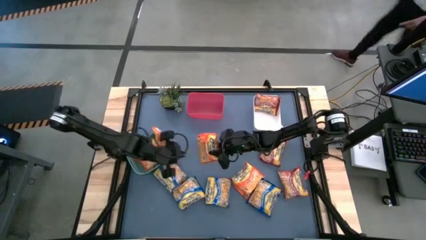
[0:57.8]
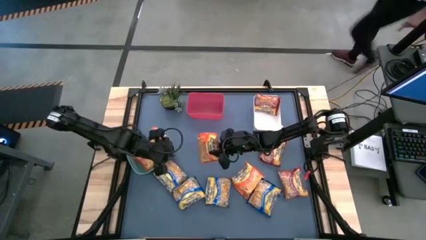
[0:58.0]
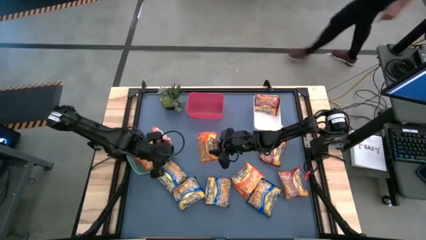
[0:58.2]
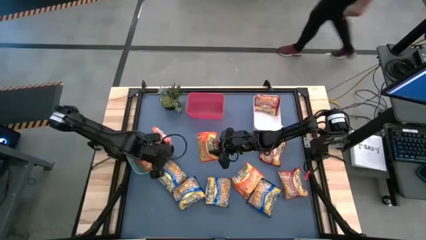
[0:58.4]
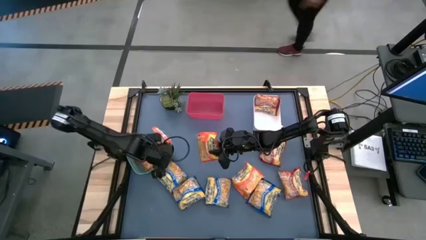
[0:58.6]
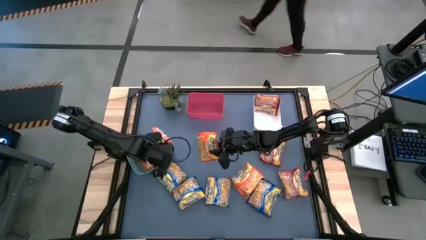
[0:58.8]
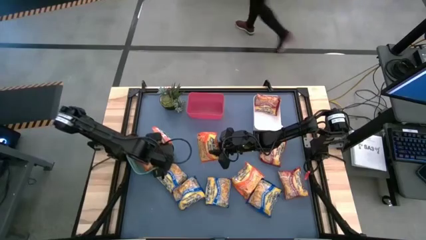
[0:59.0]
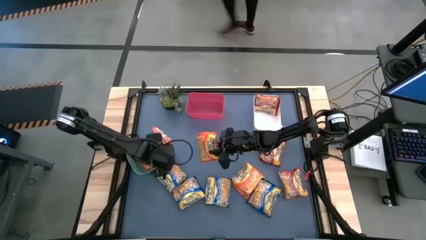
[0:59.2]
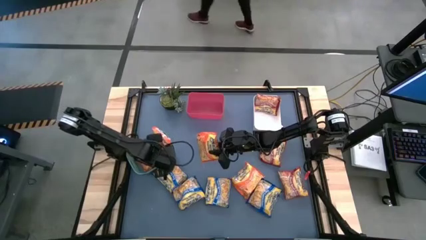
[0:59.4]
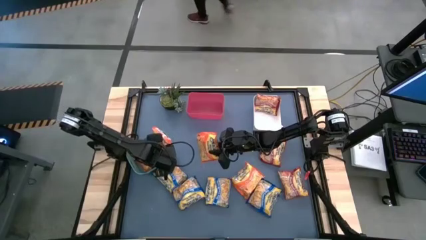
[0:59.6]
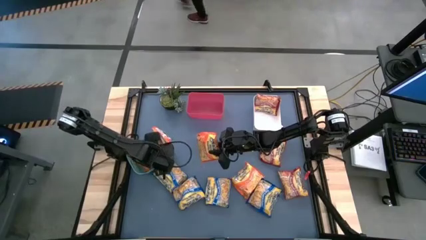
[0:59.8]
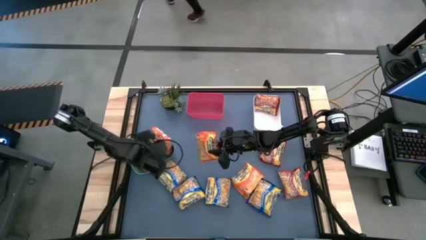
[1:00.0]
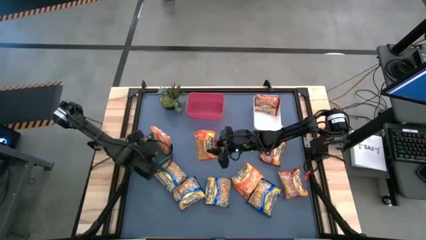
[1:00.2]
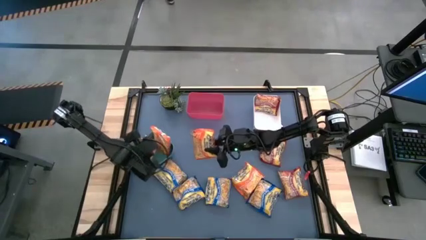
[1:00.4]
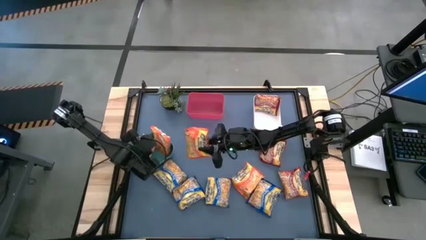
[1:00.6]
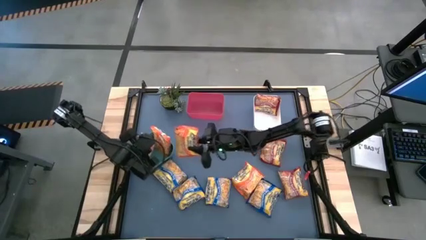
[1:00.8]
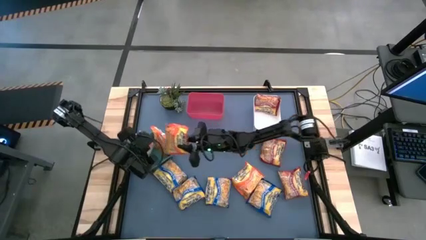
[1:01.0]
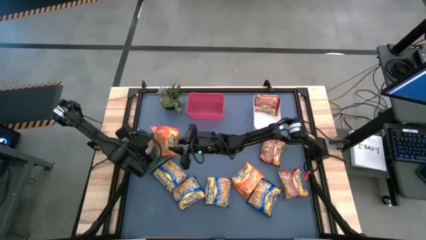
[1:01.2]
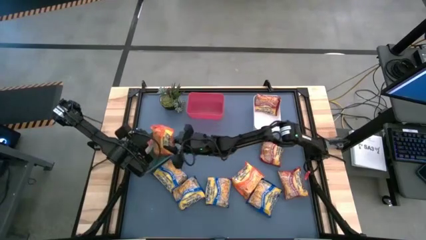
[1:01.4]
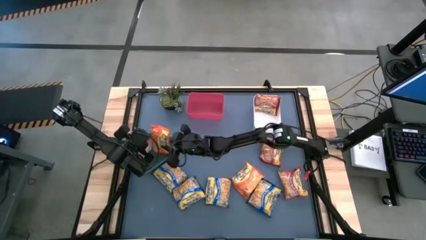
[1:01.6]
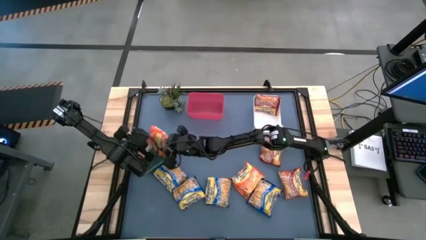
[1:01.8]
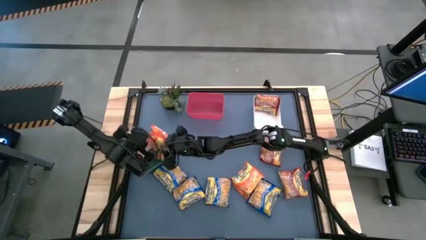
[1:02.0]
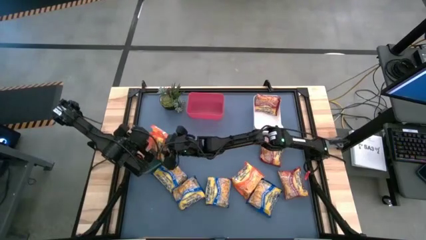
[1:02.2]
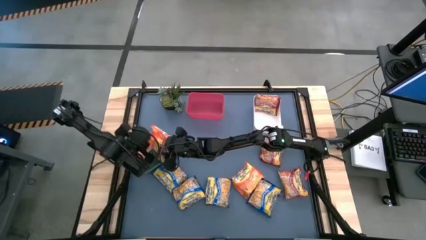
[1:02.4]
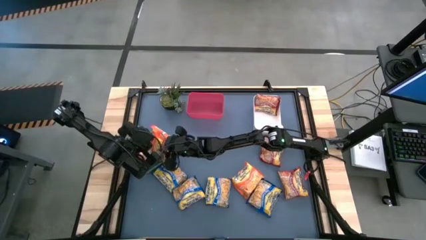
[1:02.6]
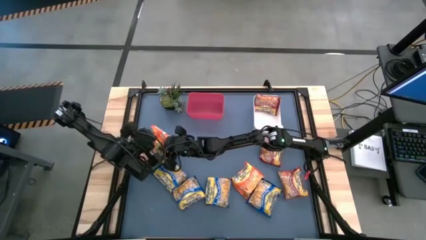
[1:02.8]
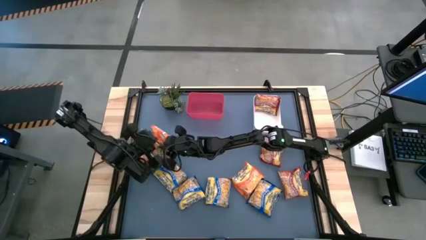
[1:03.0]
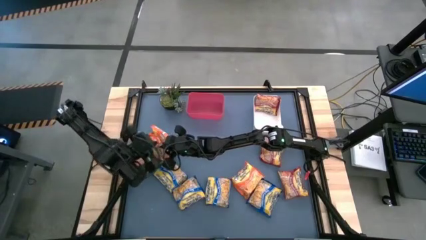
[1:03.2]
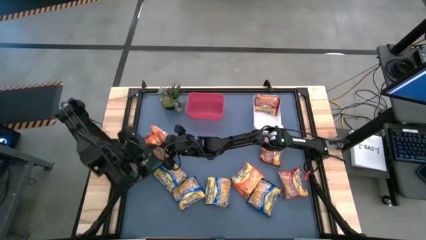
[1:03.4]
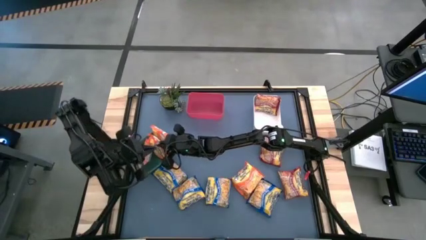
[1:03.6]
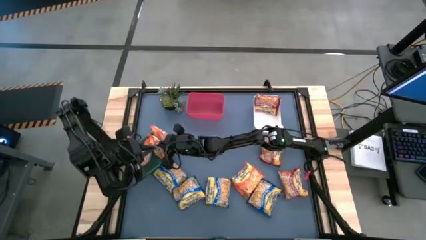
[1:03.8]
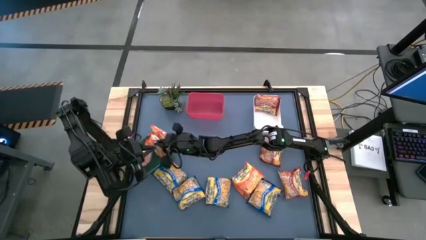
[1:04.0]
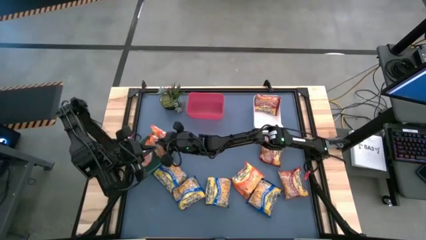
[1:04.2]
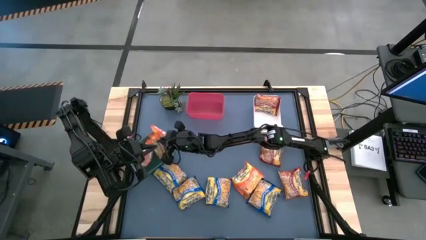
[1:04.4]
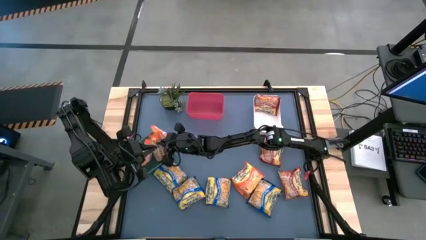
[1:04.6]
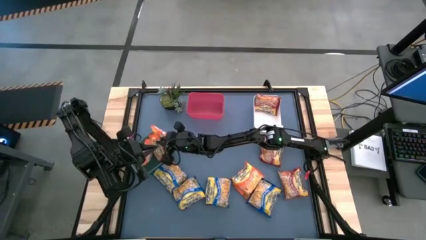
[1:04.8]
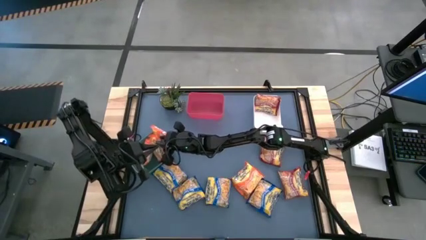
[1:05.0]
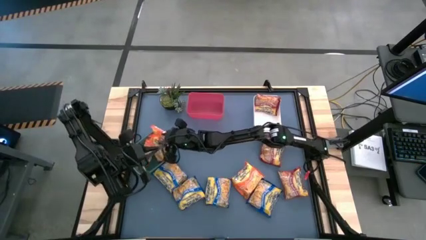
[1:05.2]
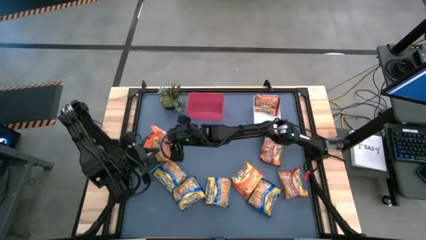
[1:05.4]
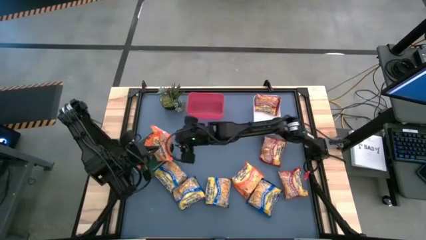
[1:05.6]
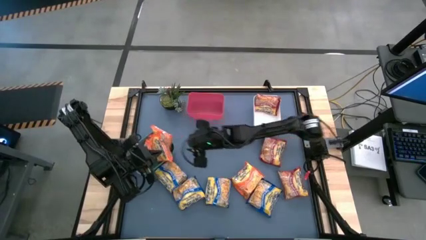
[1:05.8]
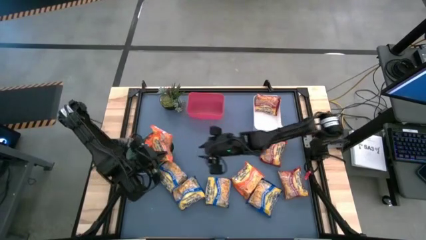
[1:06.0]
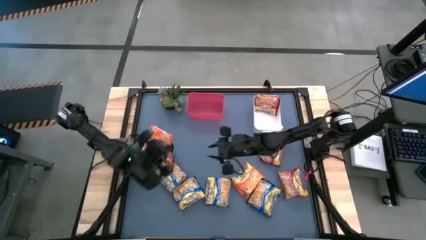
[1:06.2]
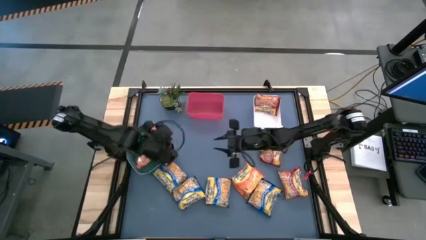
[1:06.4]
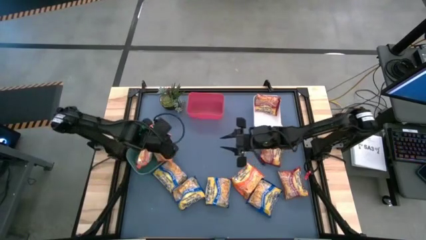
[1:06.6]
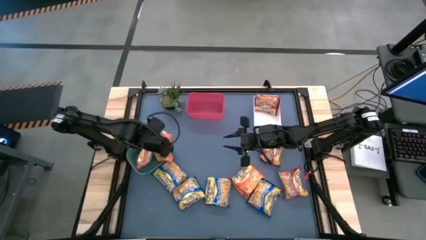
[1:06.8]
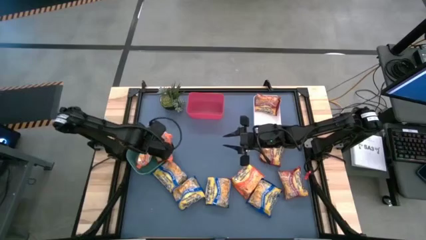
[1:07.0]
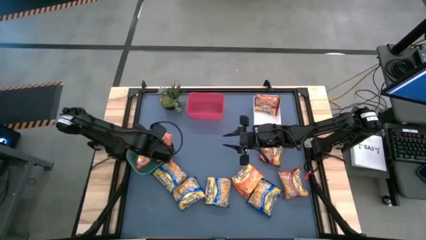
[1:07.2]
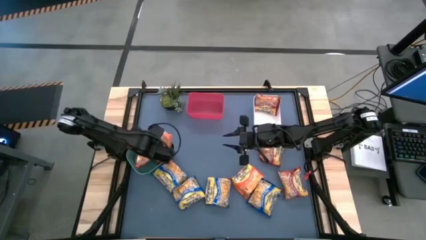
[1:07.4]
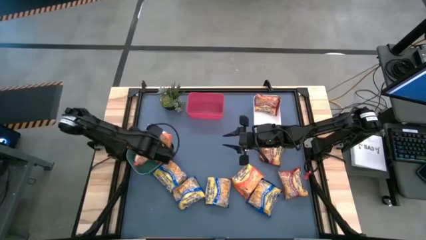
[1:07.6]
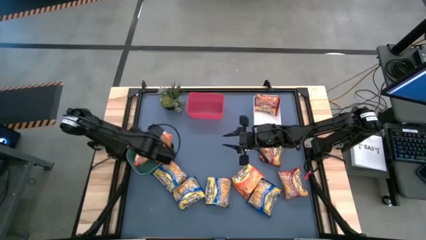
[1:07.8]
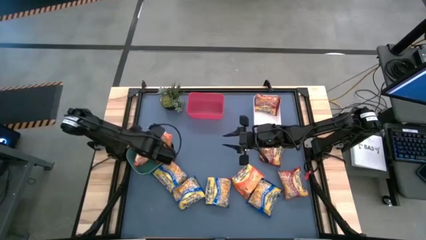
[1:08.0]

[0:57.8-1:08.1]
Task: Sort Maruchan noodles
Put the orange noodle pack into the green bin

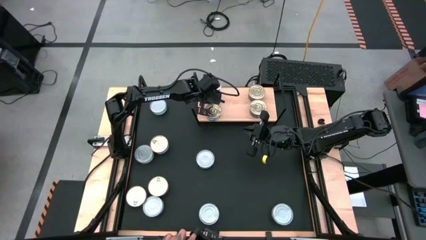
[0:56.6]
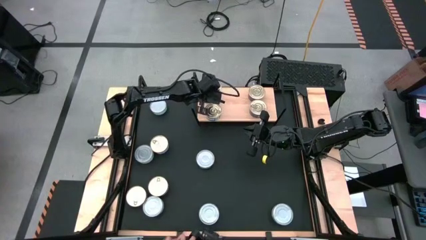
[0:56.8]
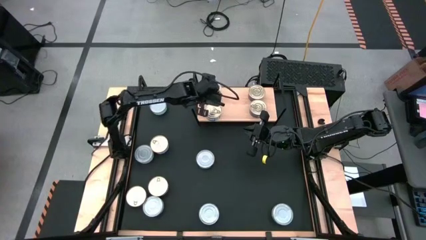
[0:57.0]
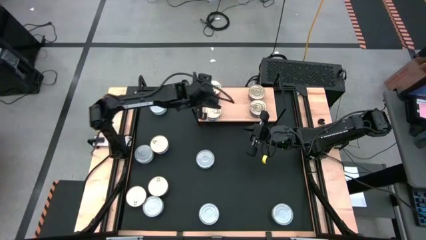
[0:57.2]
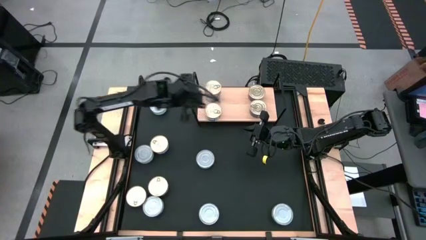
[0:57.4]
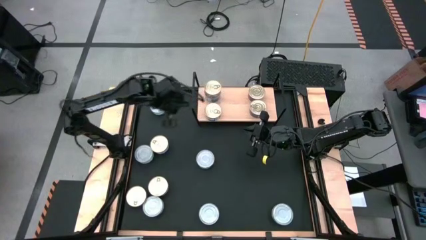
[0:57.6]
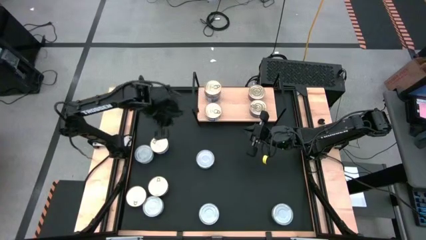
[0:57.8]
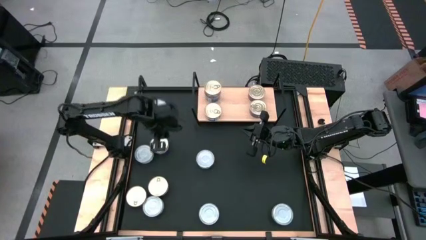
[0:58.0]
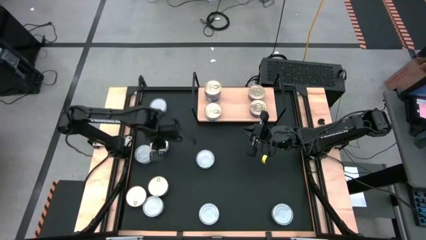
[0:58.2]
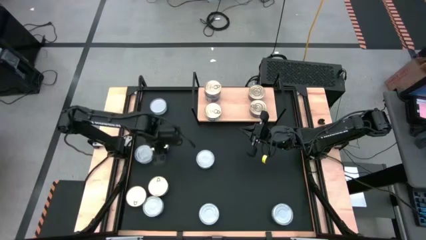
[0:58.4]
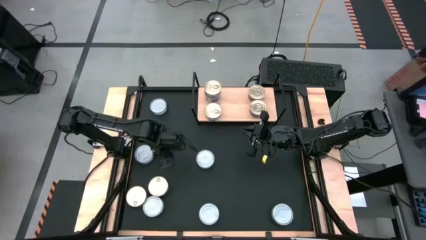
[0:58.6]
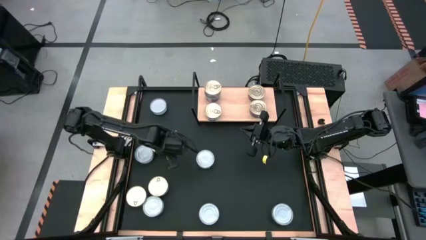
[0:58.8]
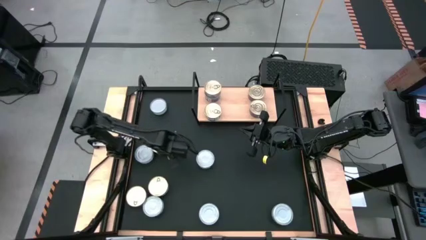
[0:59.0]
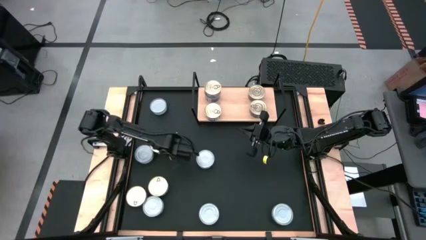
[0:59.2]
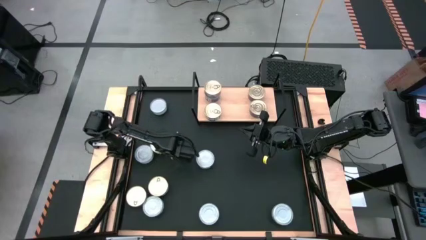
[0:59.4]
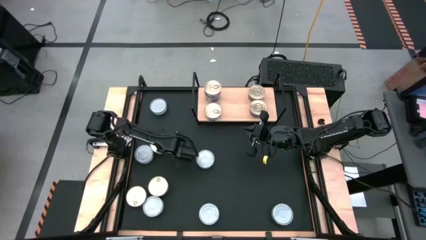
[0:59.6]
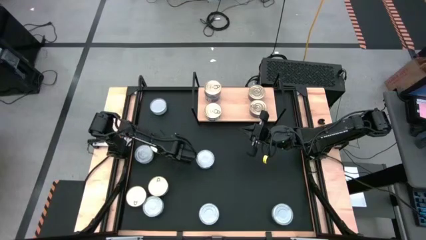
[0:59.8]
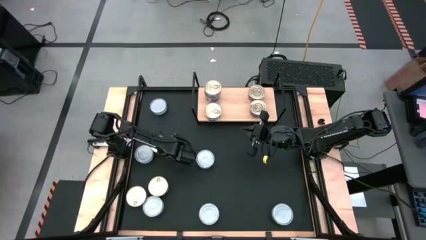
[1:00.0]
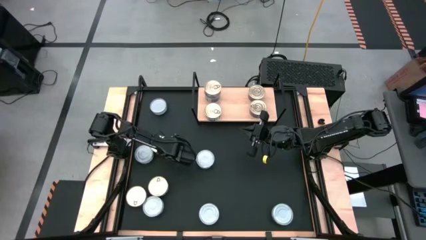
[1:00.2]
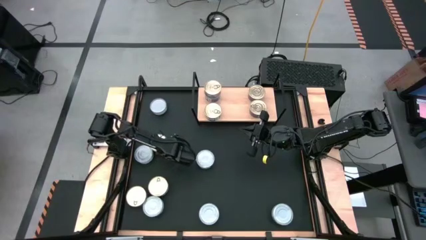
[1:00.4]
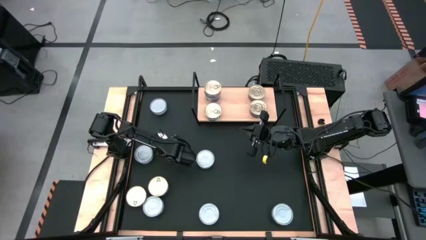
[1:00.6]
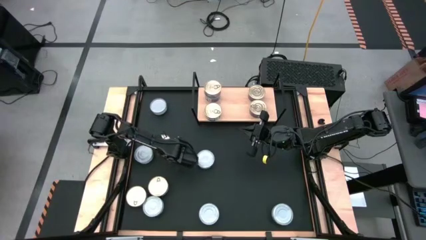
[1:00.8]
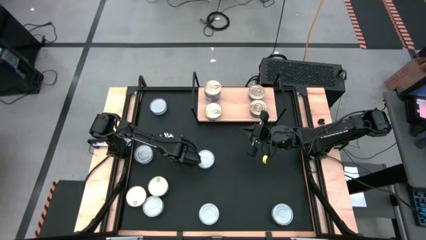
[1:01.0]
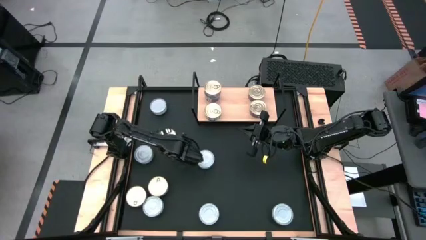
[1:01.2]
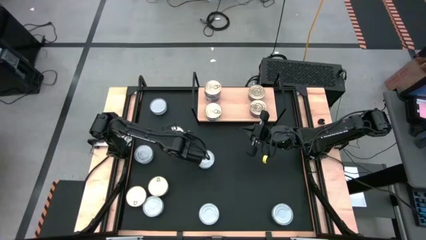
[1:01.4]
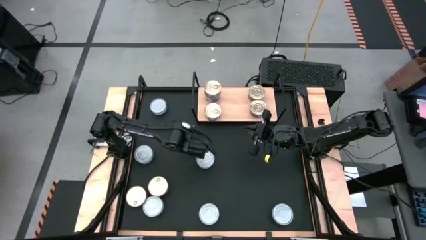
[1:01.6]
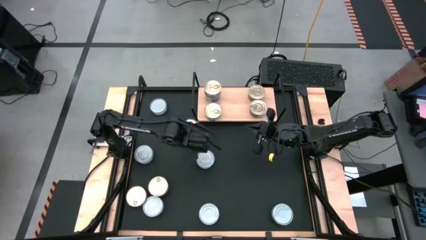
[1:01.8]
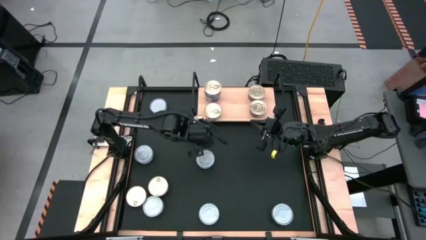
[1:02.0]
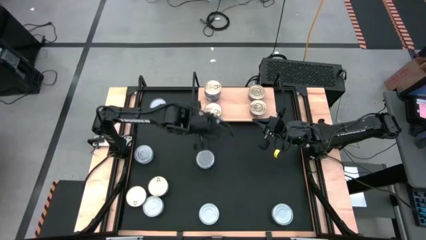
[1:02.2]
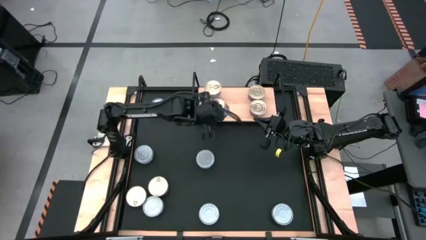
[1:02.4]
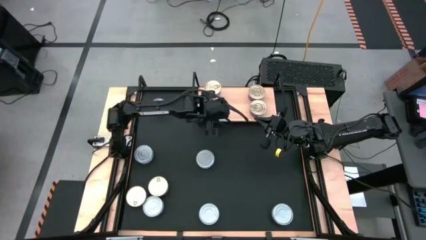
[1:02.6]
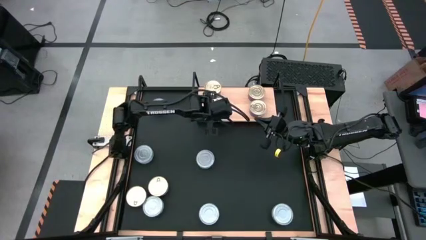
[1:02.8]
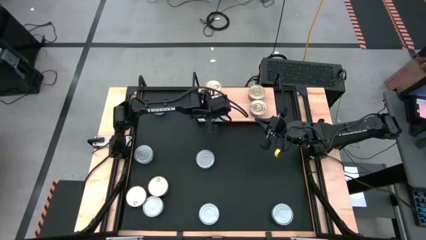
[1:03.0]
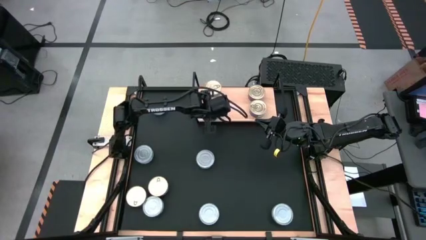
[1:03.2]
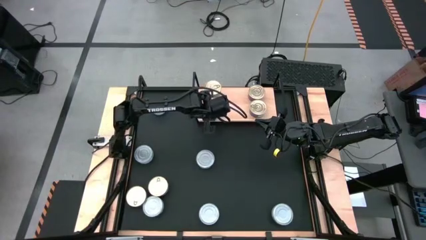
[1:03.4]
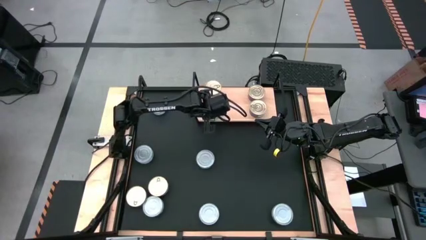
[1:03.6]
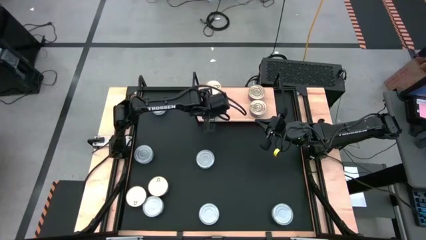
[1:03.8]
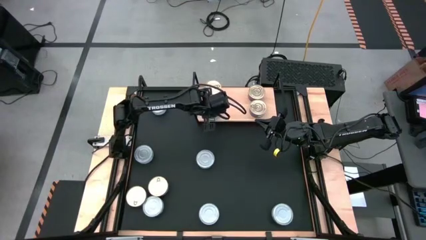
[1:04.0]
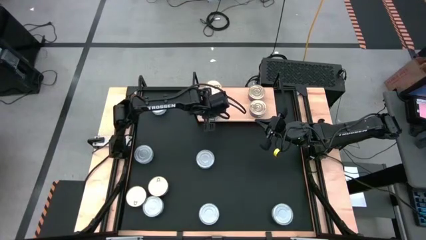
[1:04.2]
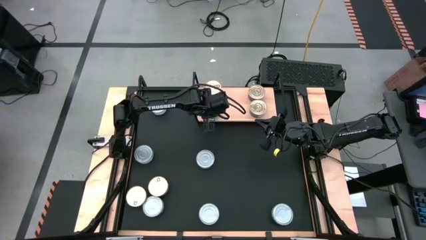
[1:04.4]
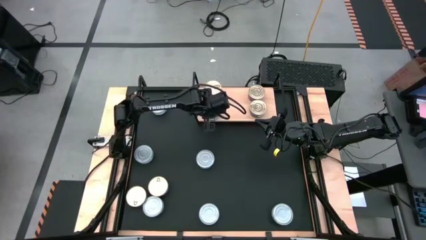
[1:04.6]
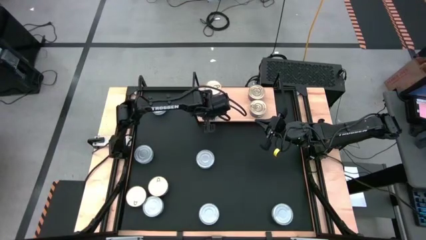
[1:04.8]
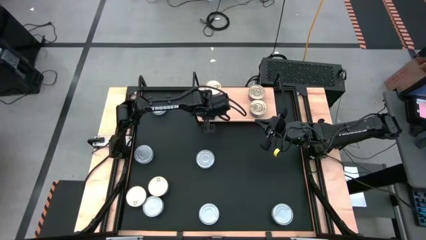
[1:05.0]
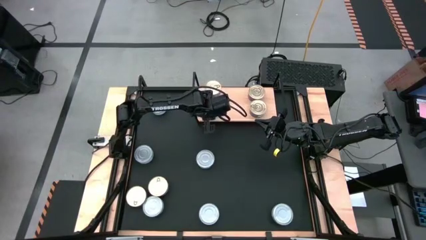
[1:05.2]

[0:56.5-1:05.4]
Task: Stack canned seafood by type on shelf
Stack the blue pink tuna can on top of the other blue pink tuna can on the shelf
